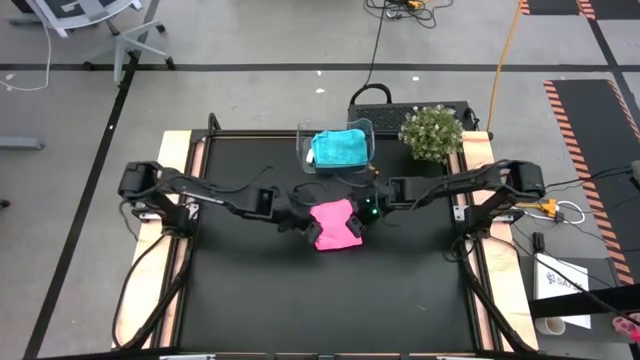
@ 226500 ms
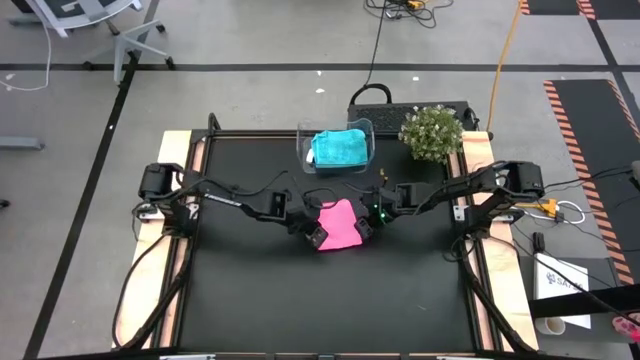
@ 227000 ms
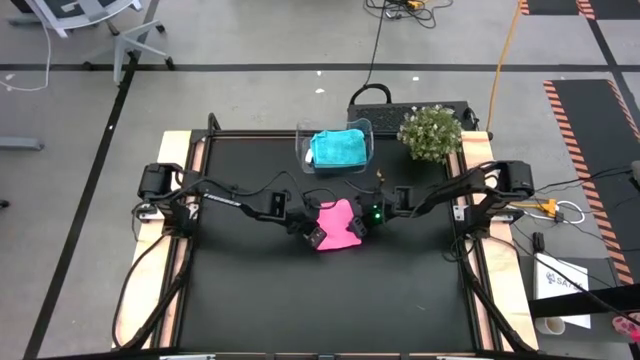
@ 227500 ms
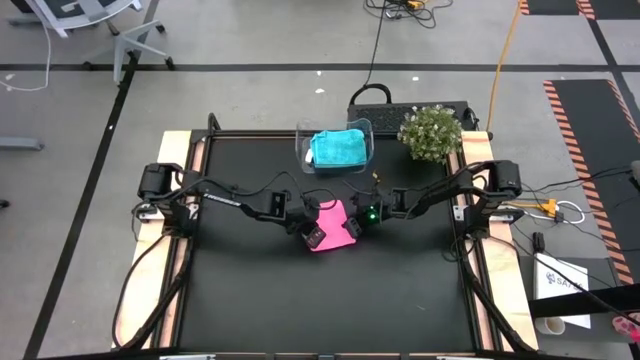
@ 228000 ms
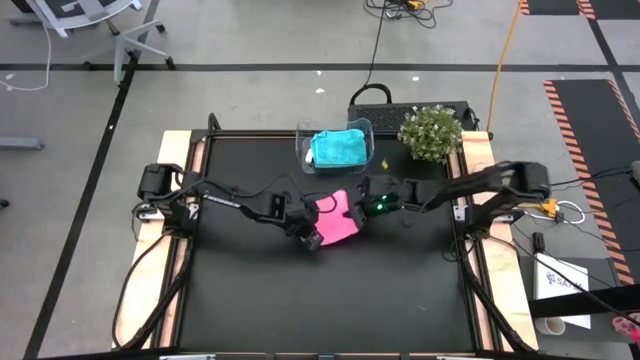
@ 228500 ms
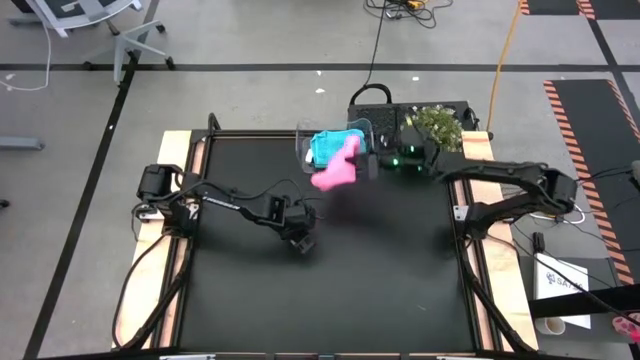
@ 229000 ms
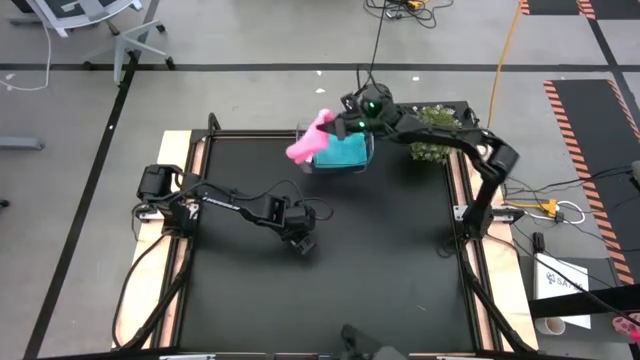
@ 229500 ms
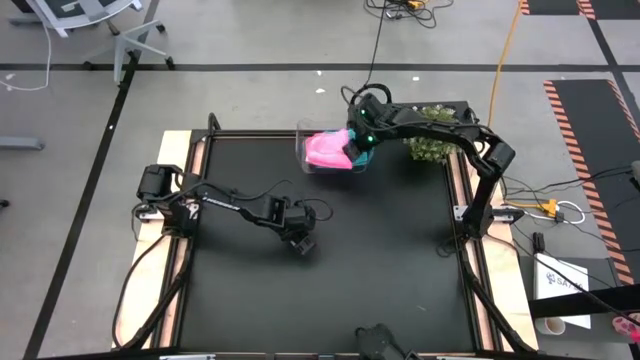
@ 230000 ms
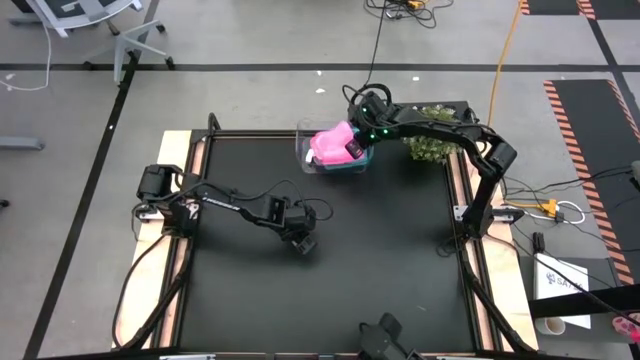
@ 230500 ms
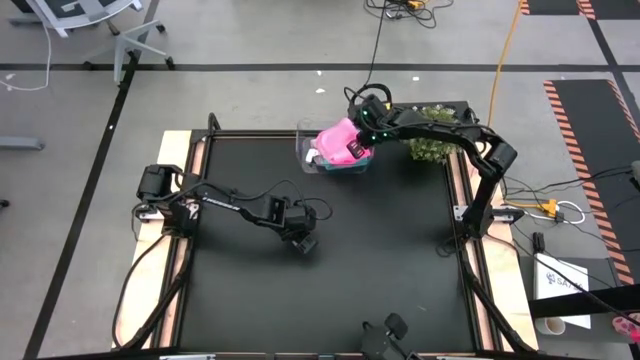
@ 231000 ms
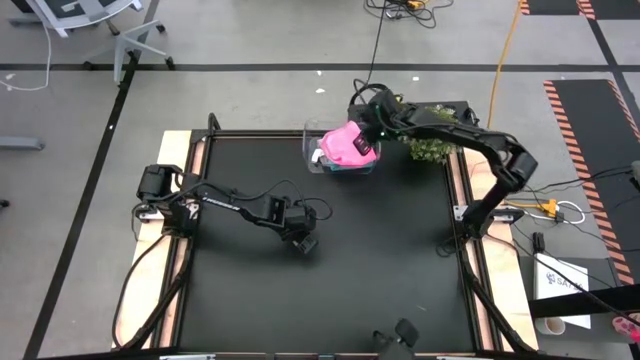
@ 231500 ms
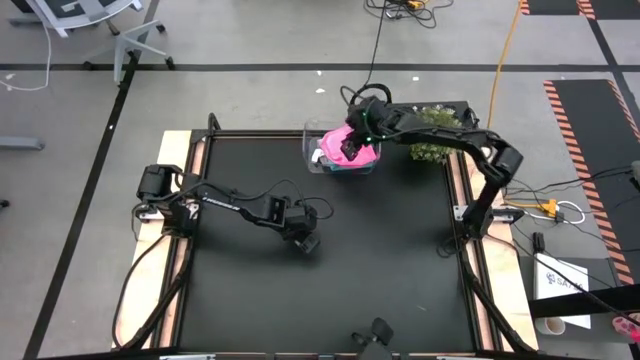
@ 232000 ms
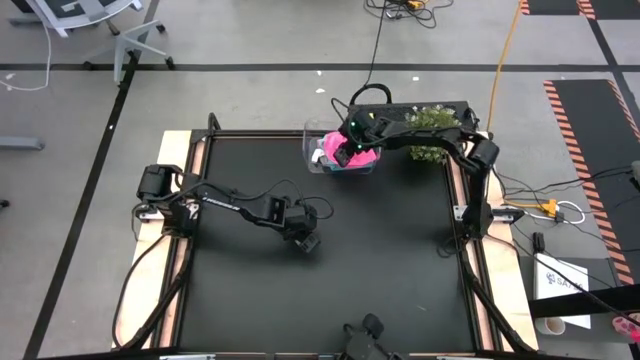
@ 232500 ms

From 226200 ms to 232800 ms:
Task: Fold microfiber towels
Put the pink microfiber cloth into the transparent bin

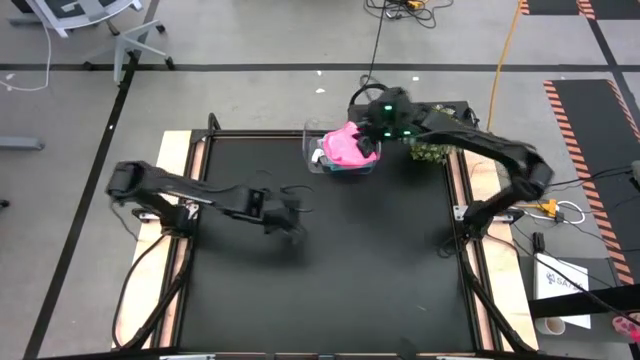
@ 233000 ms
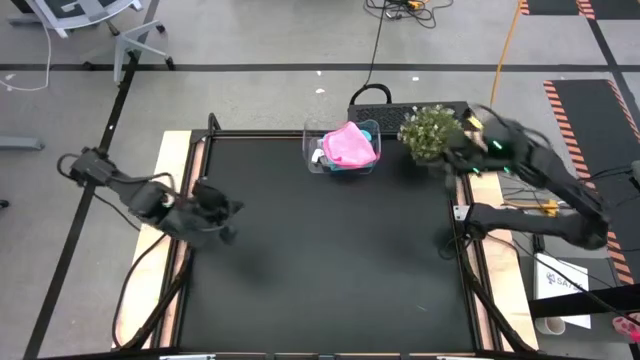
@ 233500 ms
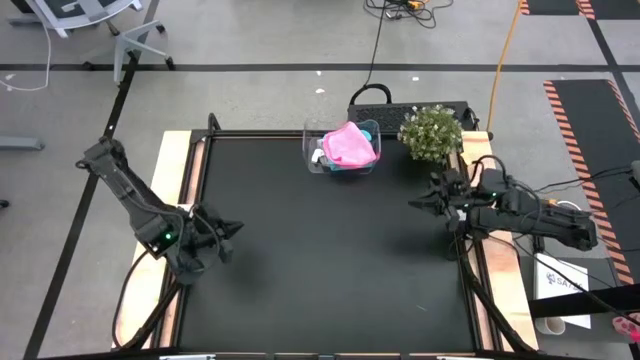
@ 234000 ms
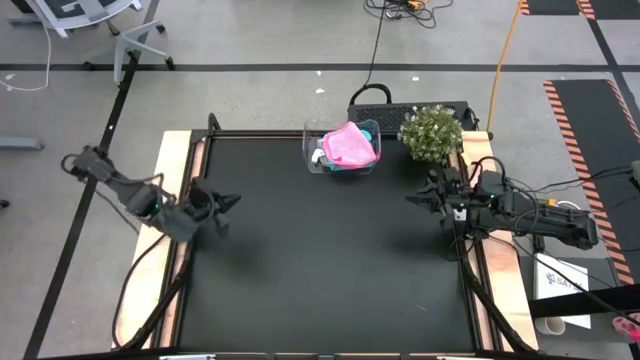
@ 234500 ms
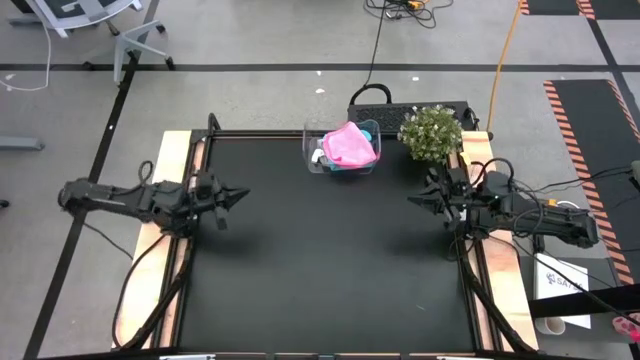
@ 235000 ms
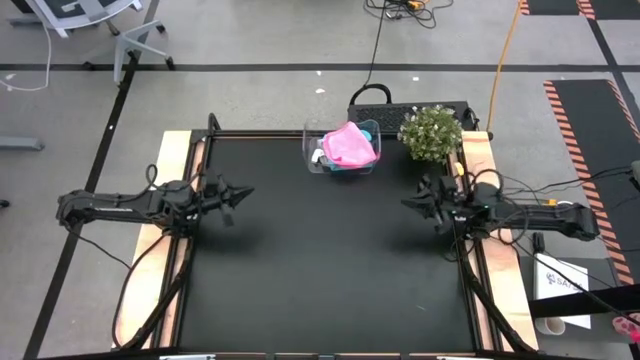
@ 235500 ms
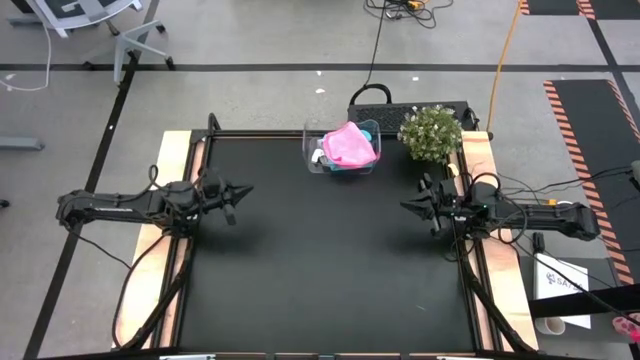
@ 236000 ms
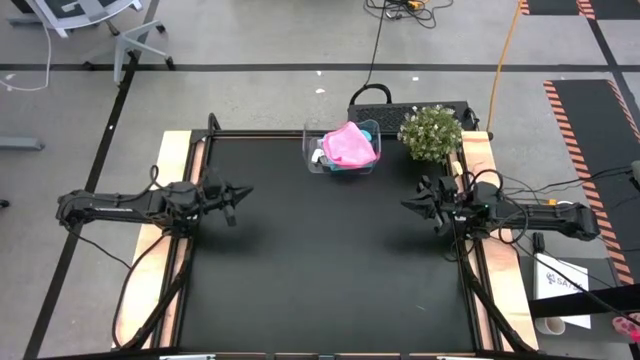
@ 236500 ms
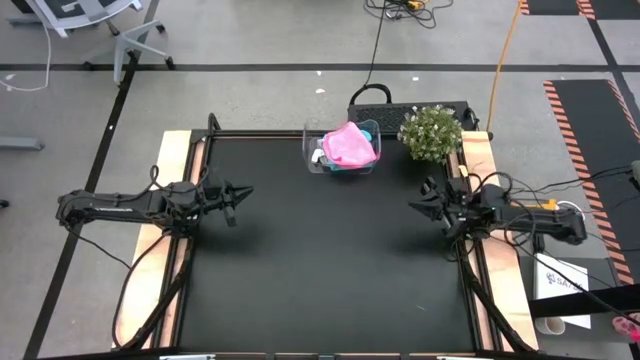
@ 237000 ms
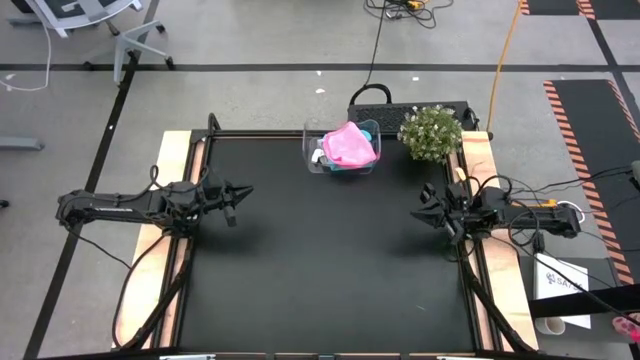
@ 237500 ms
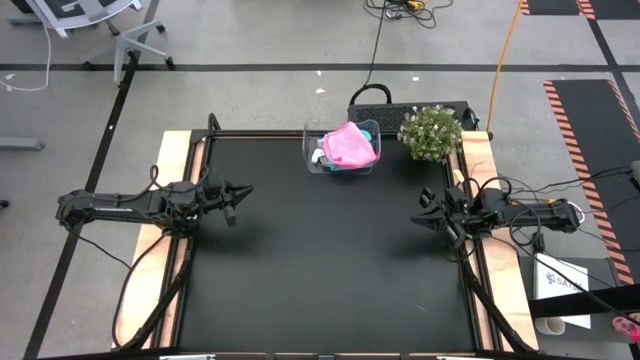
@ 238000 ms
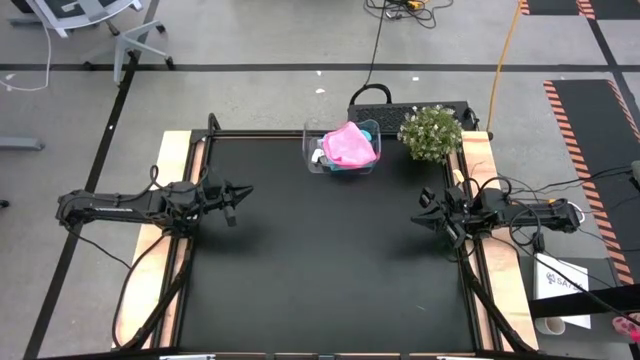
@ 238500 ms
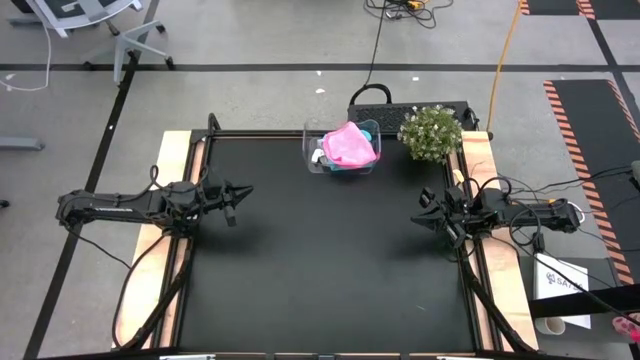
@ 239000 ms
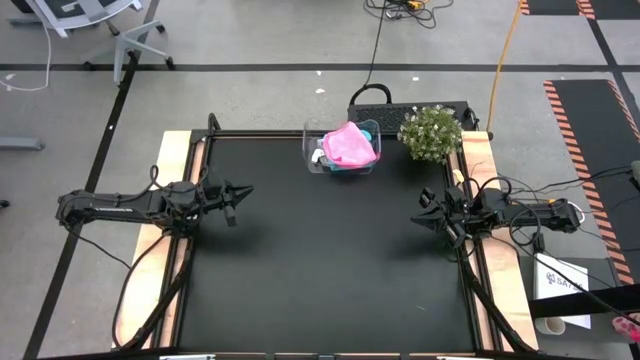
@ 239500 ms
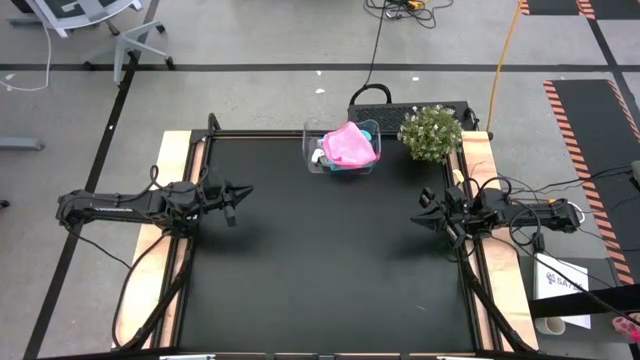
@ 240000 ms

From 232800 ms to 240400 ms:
Return to Home Position

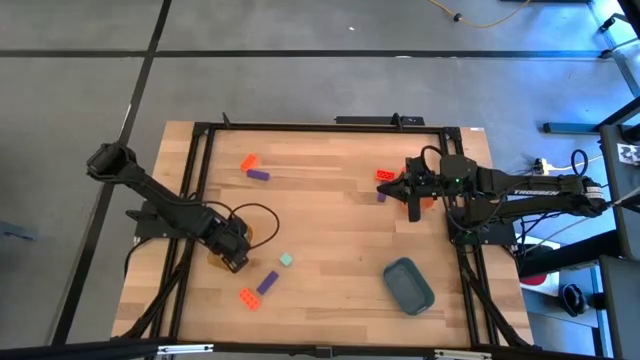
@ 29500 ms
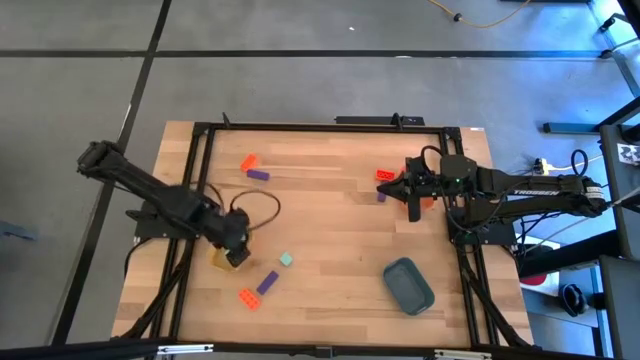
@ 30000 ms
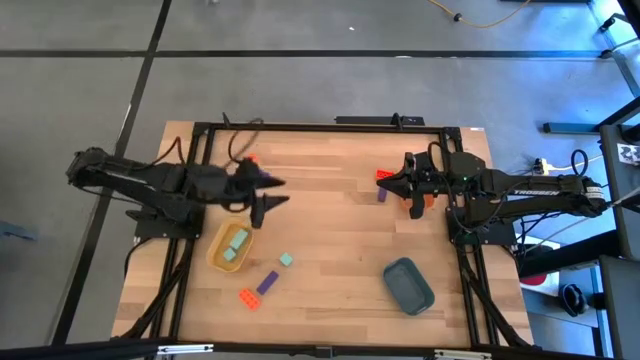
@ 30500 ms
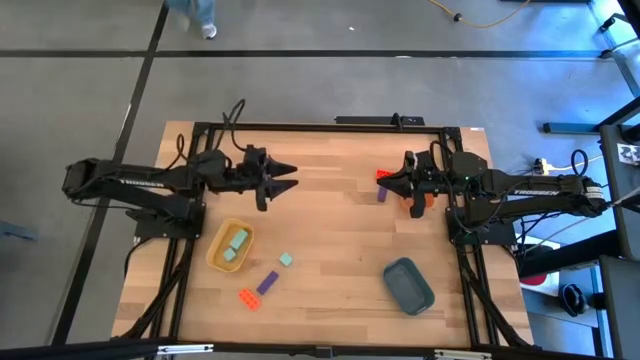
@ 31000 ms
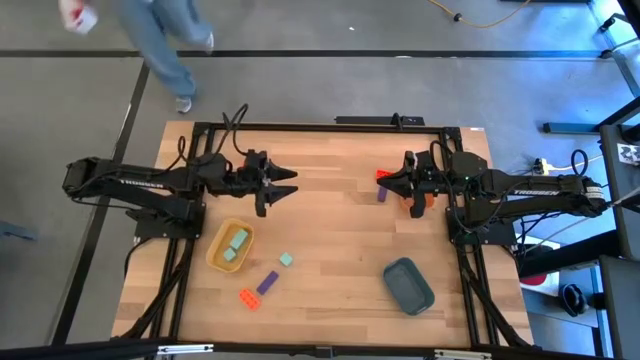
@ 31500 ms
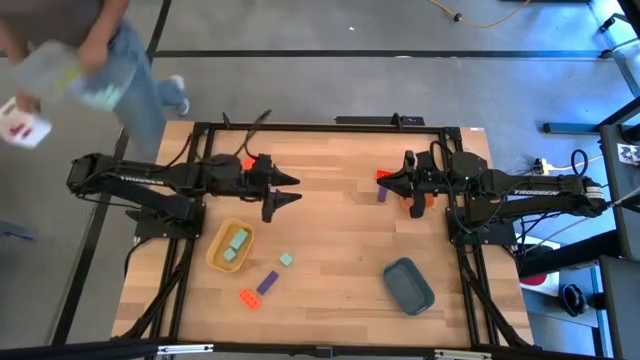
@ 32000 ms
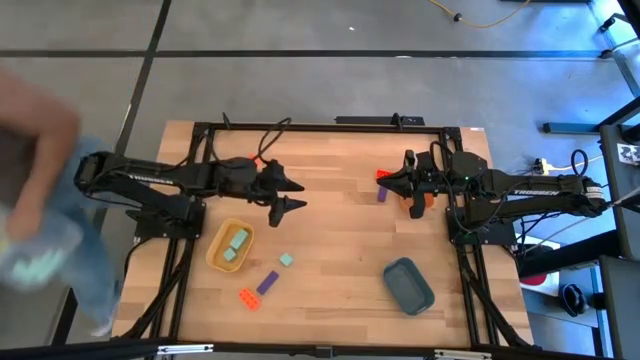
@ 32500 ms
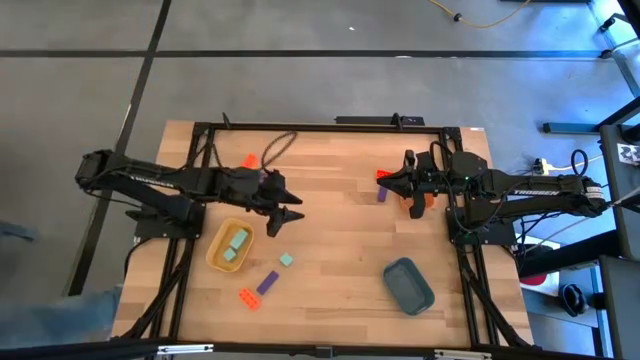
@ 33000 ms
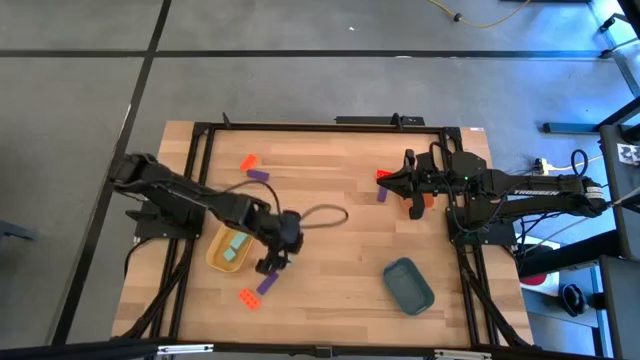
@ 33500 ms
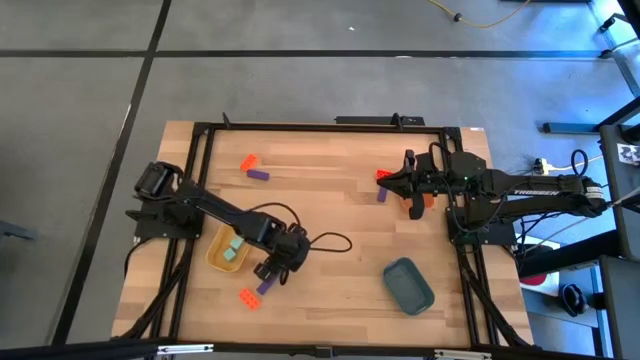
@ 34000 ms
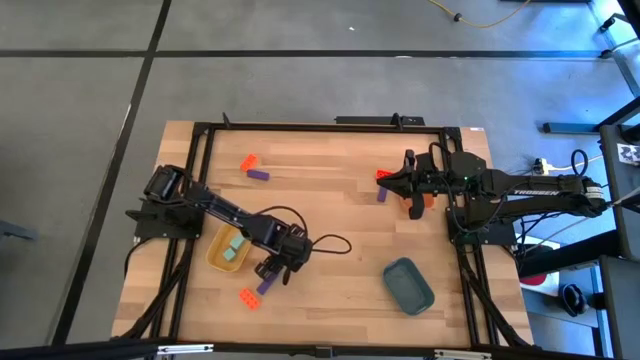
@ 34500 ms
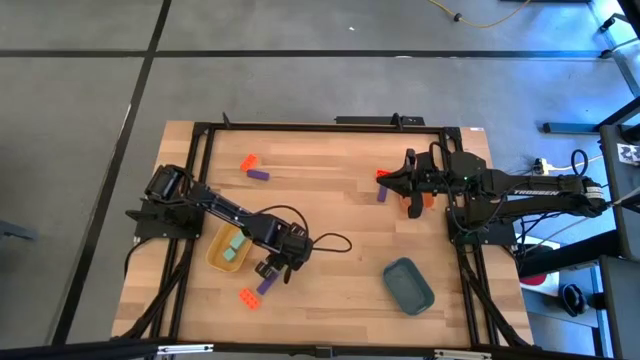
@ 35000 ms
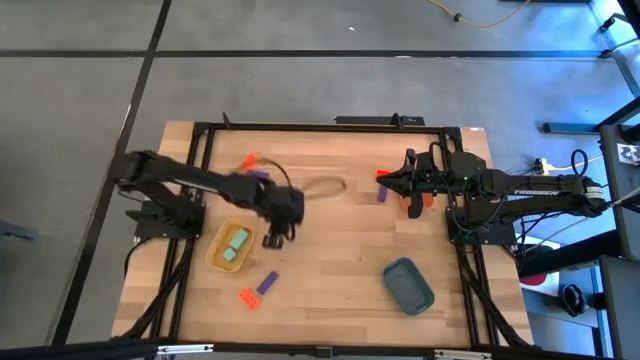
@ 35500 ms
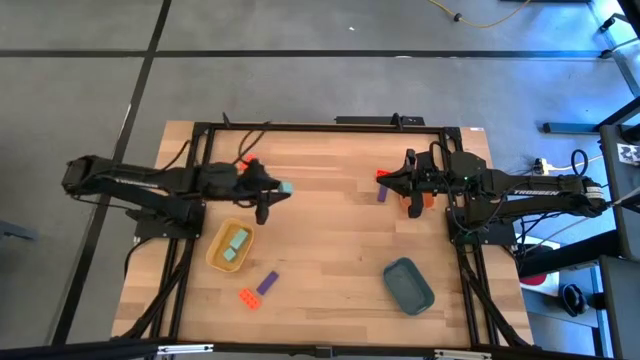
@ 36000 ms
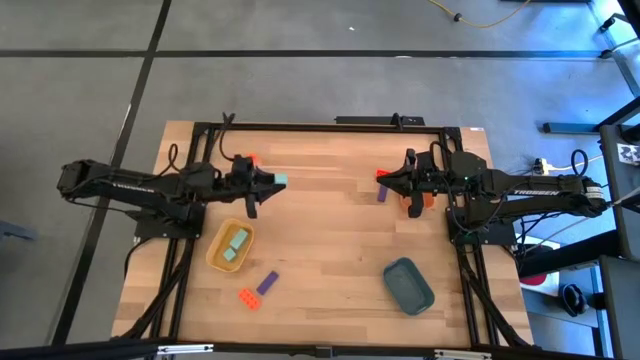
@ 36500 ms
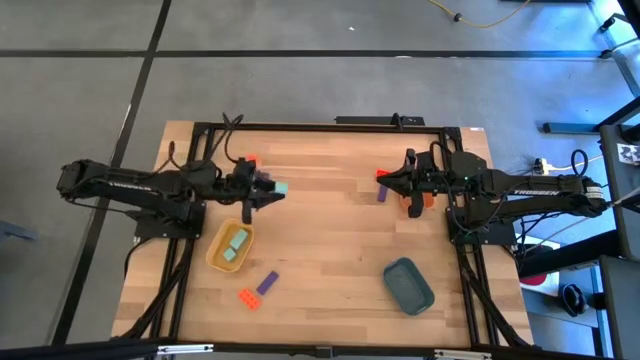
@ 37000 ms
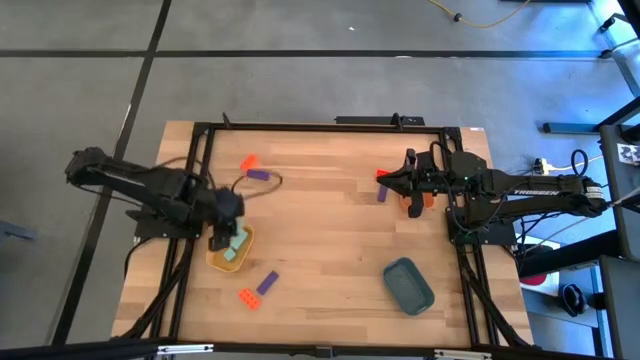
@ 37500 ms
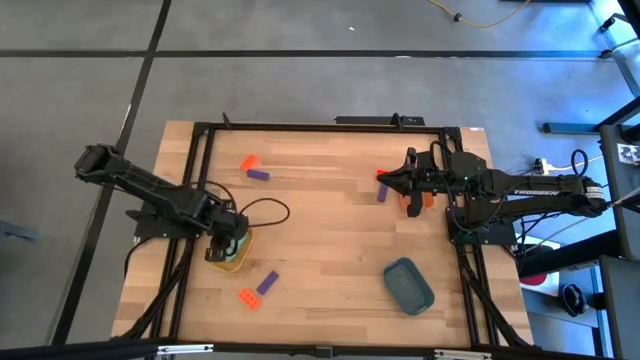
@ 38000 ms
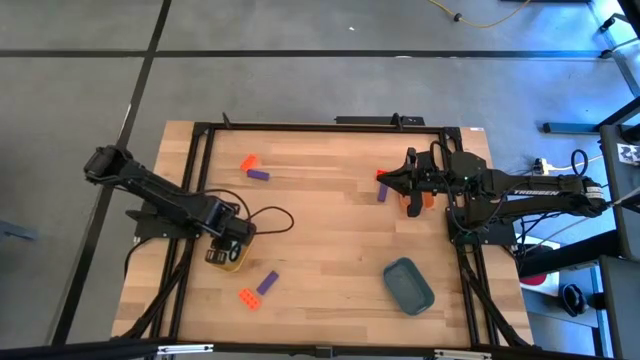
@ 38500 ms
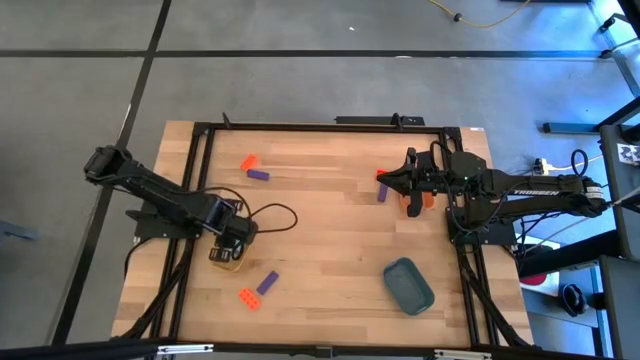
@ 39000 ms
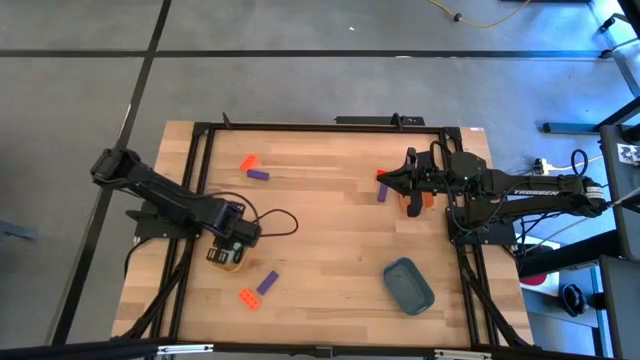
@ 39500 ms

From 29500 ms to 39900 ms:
Task: Sort & place blocks by color
Put the blue block into the yellow bin
